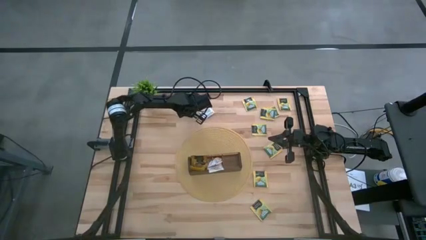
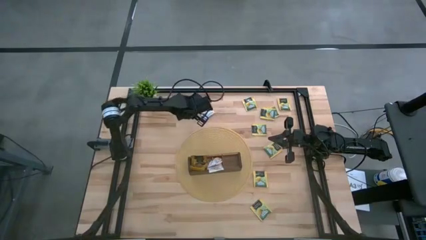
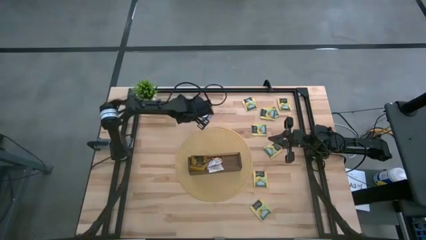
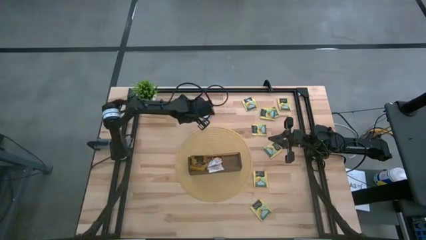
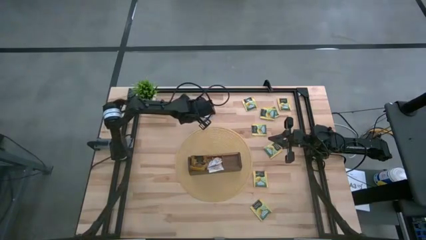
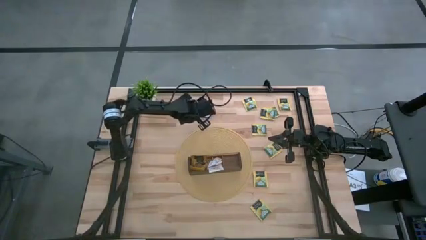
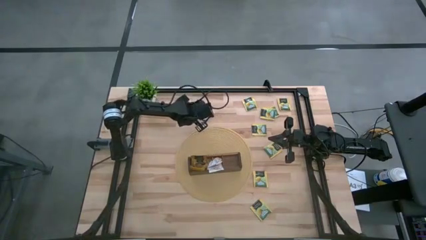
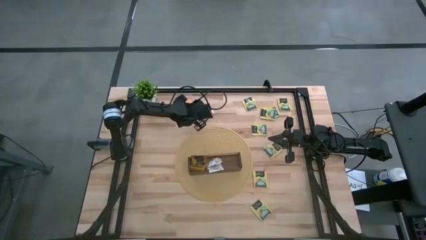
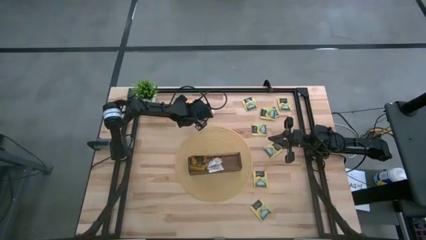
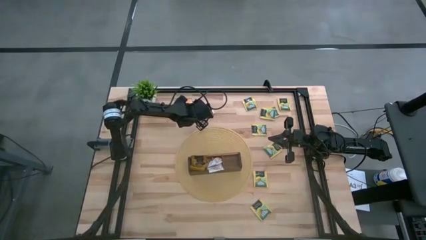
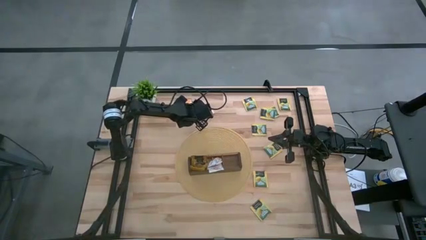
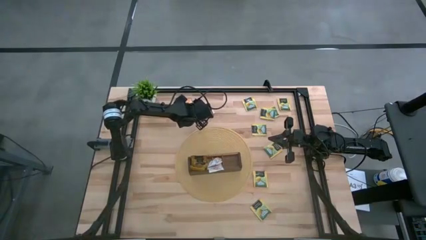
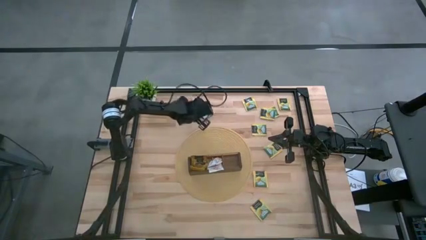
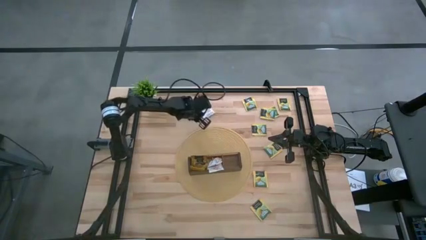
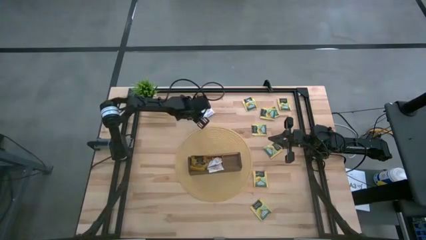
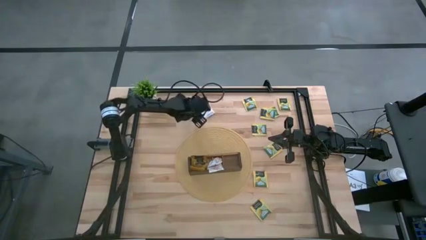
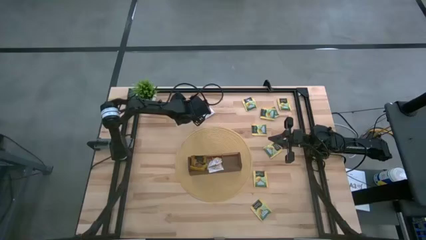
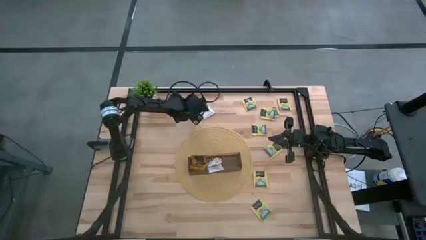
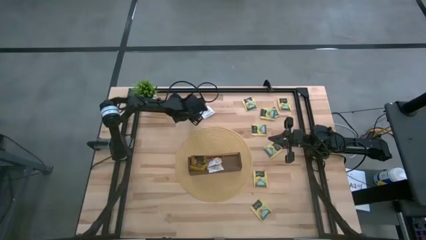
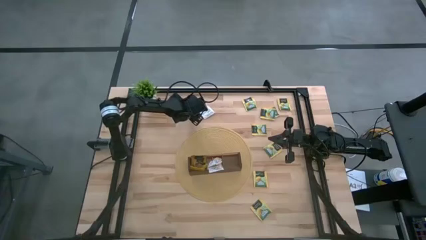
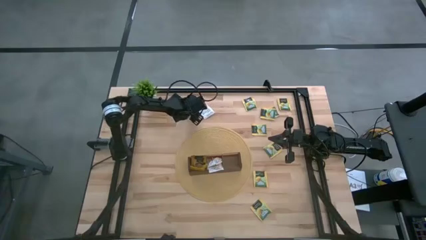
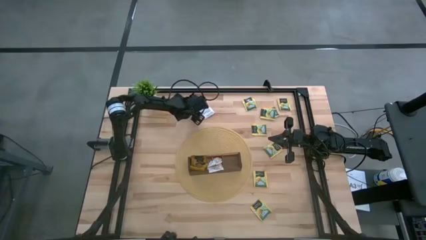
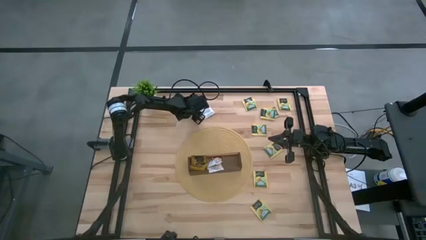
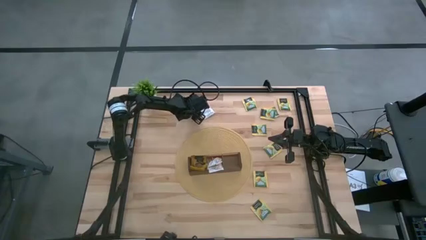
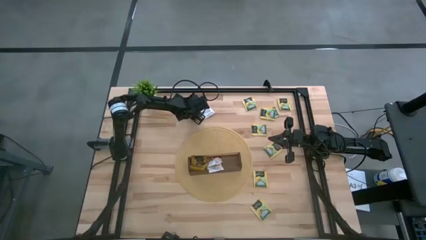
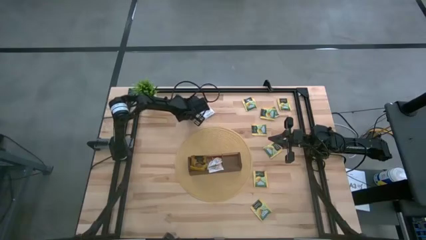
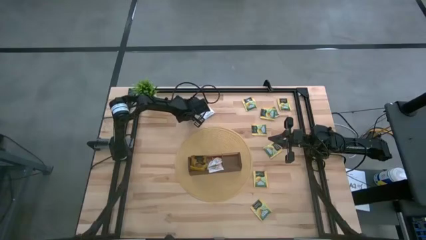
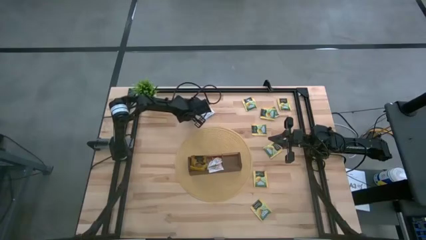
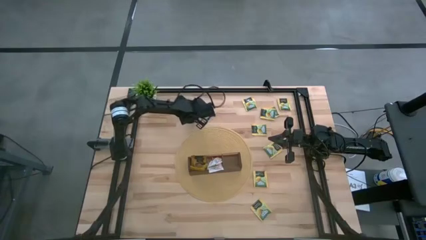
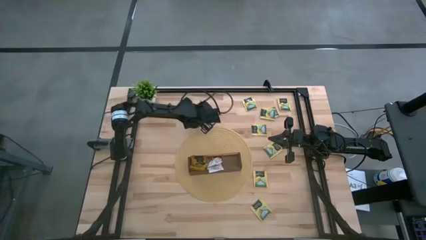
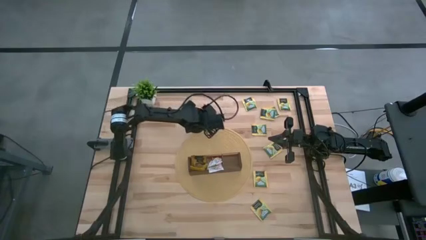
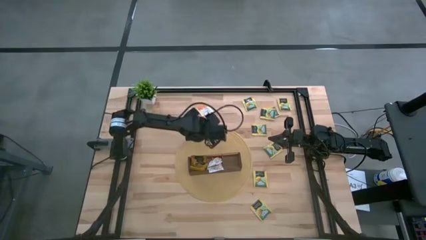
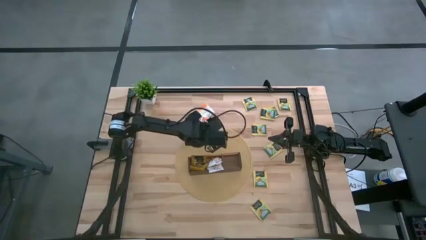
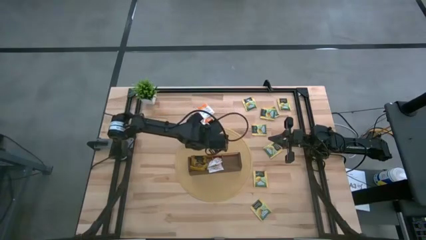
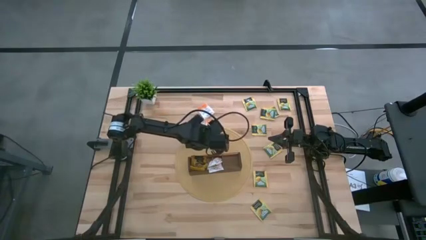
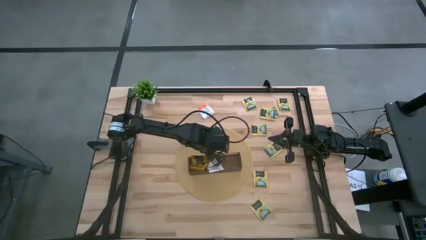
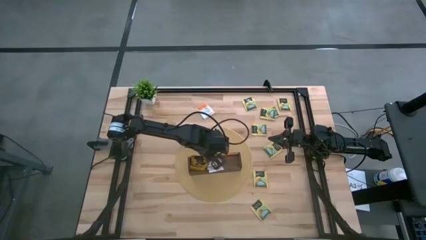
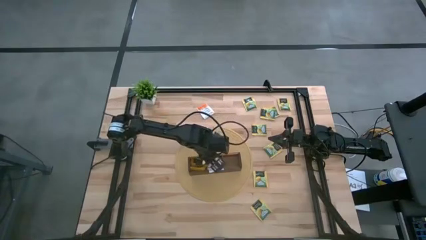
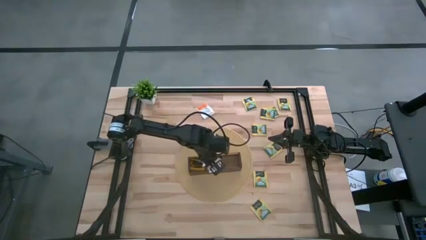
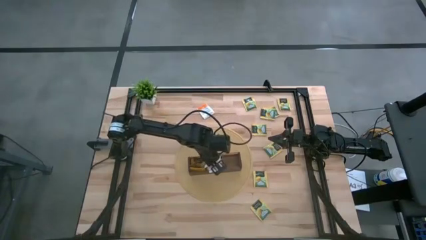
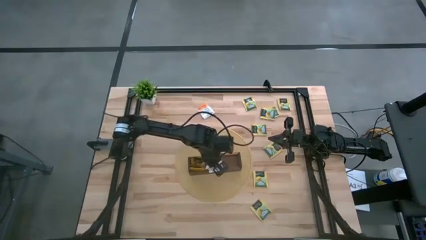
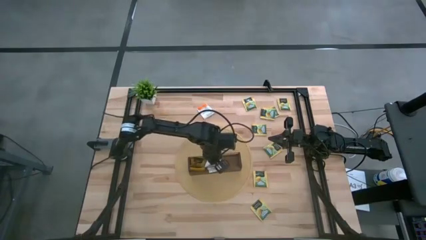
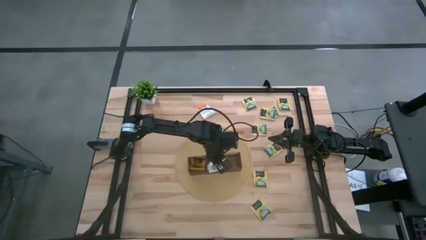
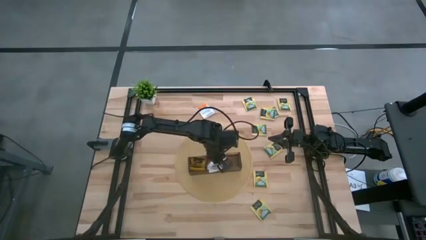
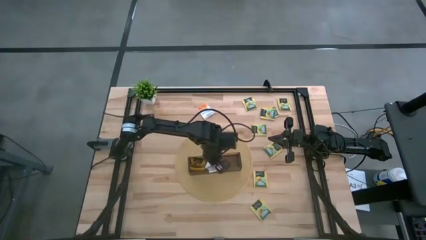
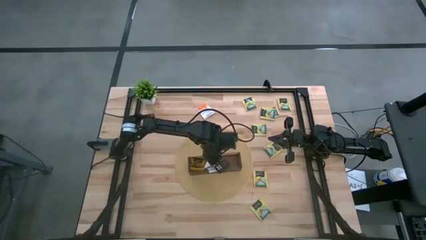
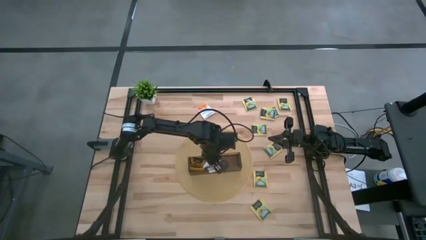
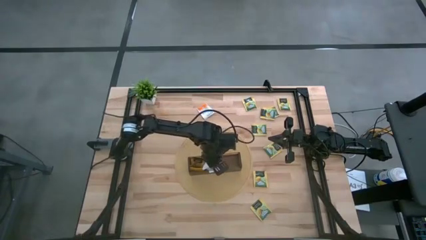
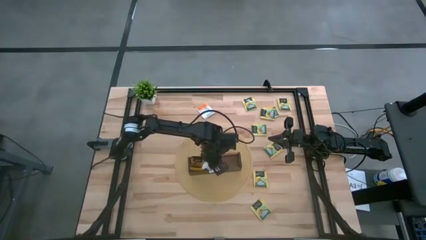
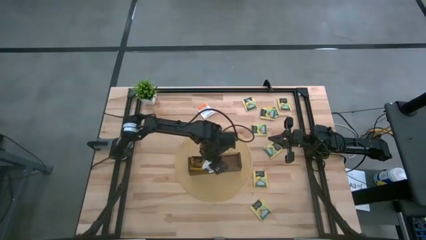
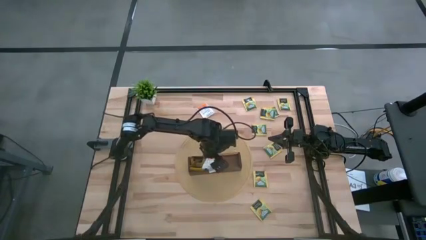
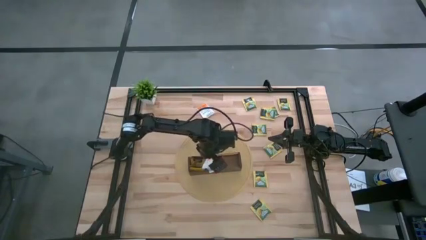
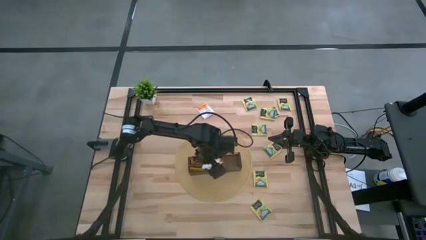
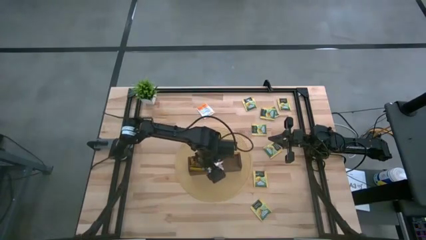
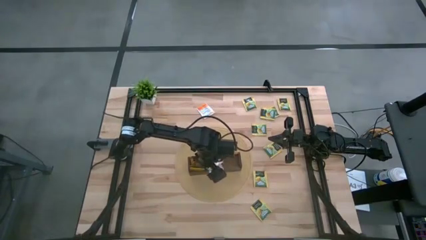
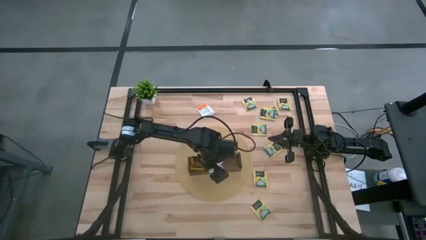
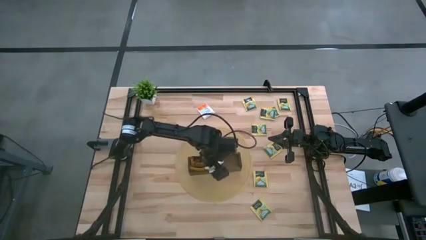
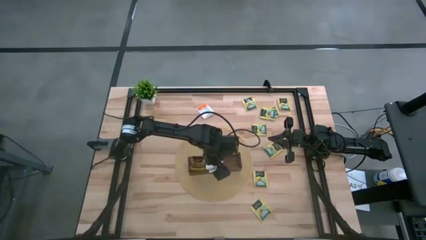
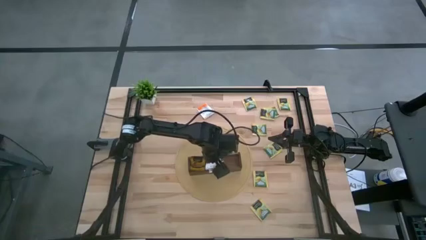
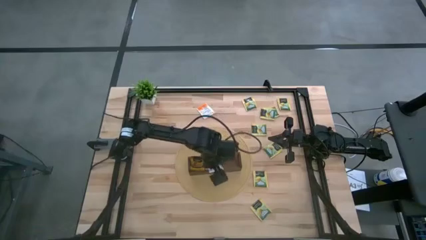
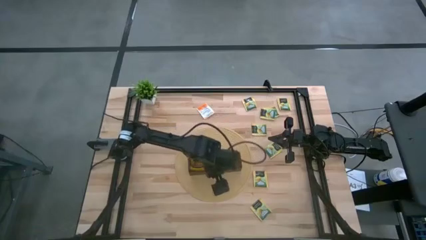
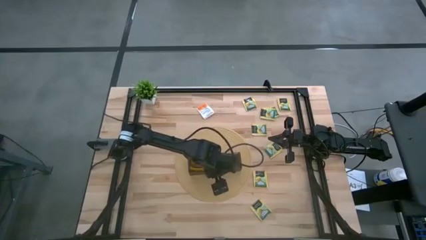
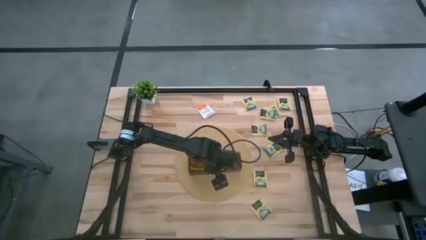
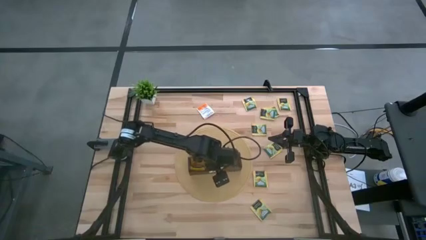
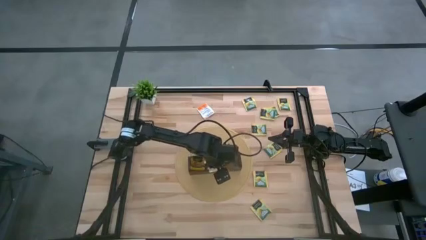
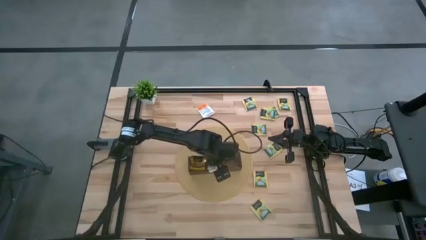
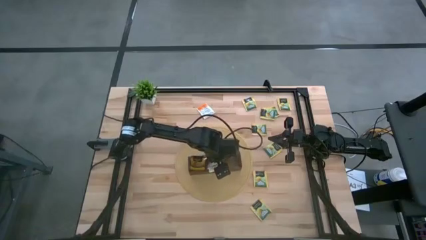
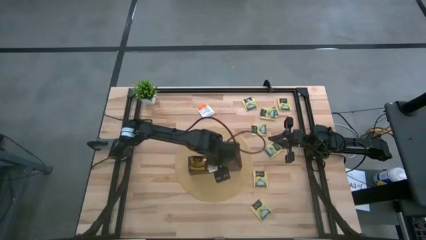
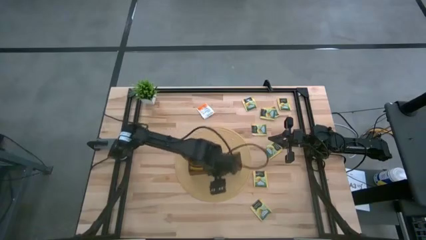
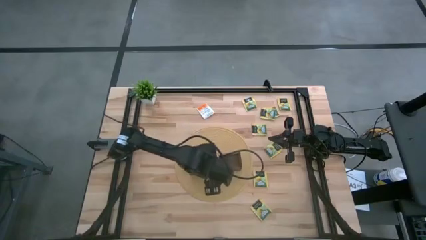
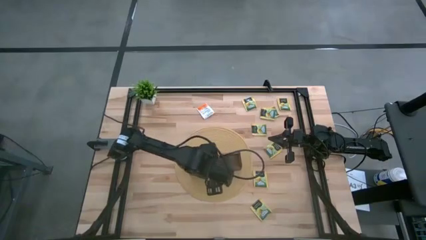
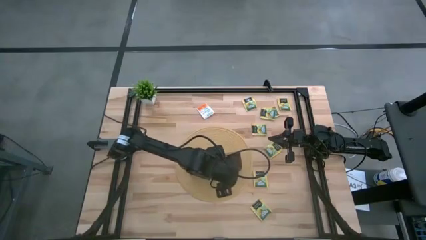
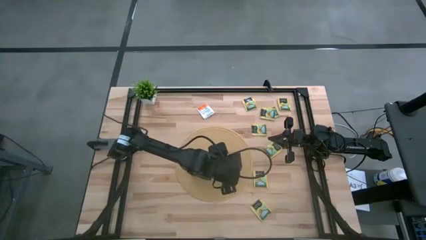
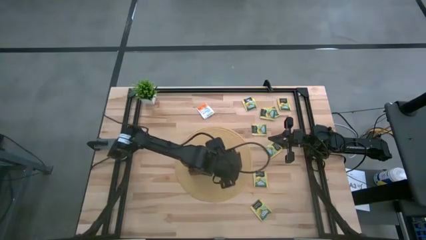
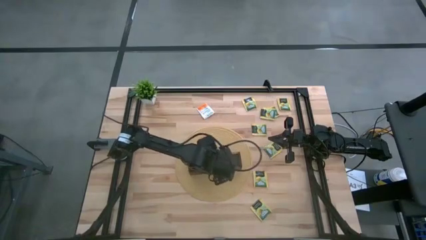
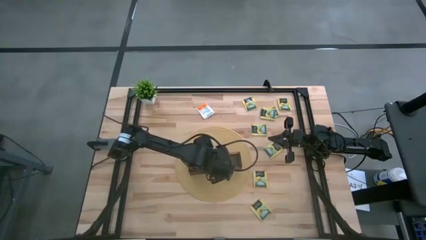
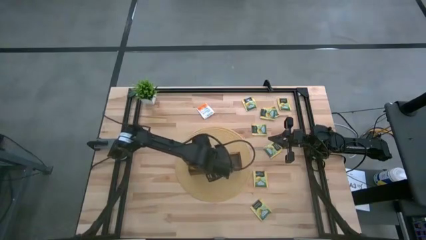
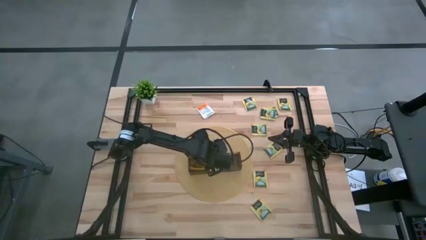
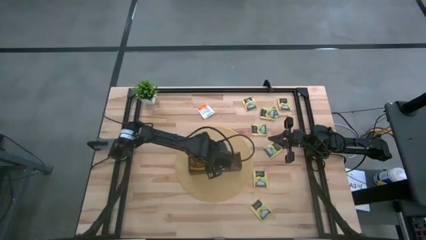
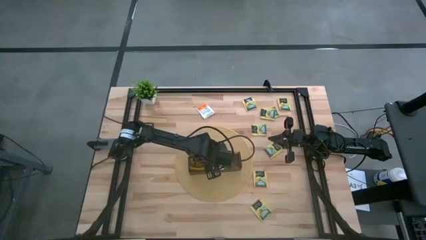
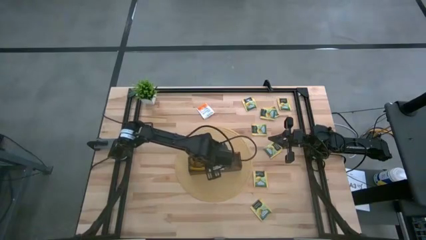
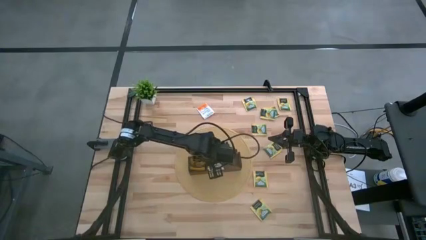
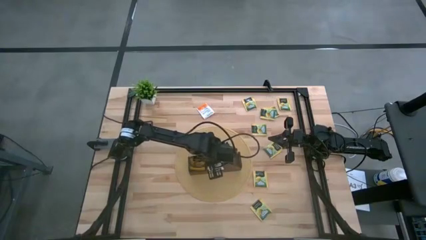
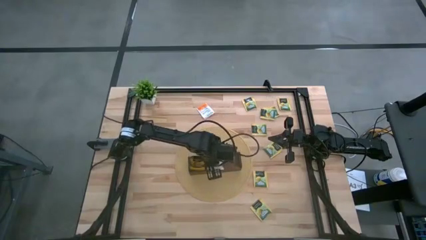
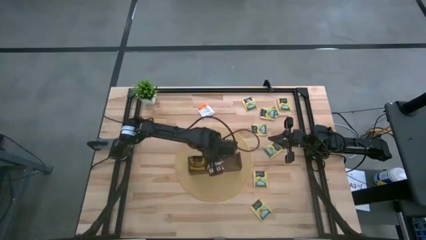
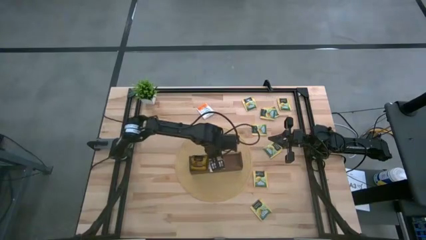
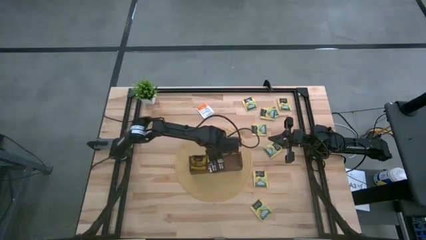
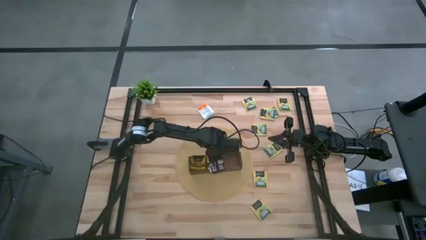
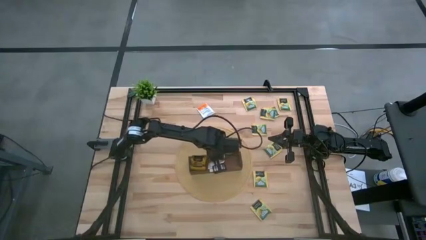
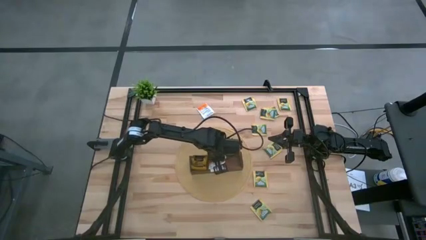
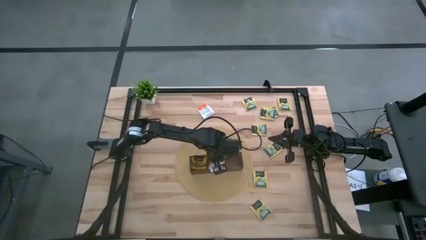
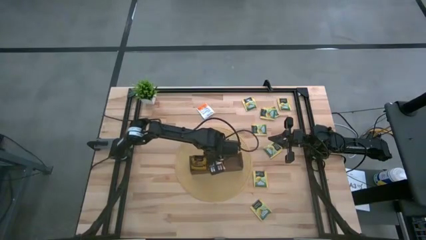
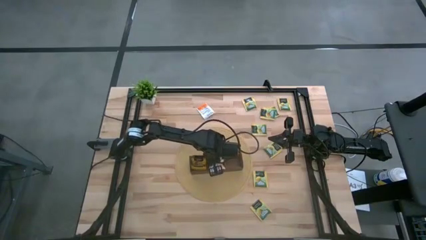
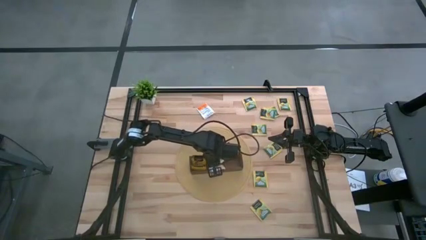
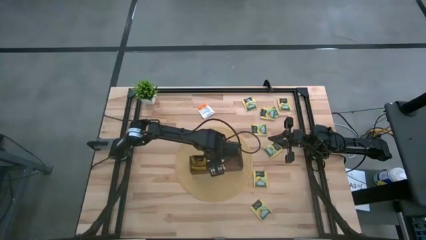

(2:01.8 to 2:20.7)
Task: Pick & Place Tea
Put the left orange tea sachet into the mid section of the wooden organizer
